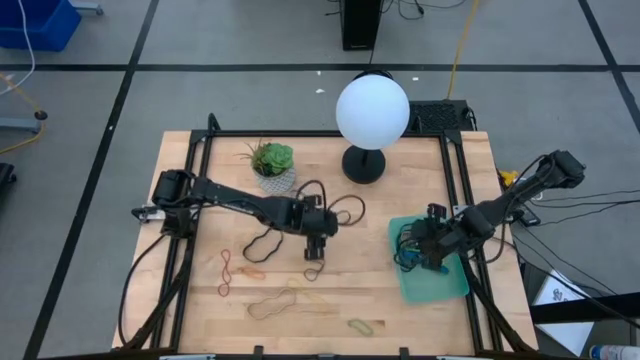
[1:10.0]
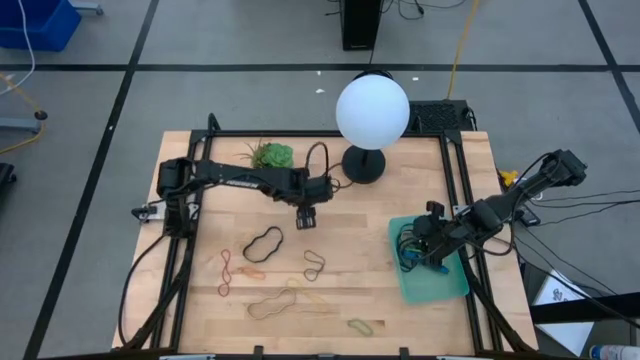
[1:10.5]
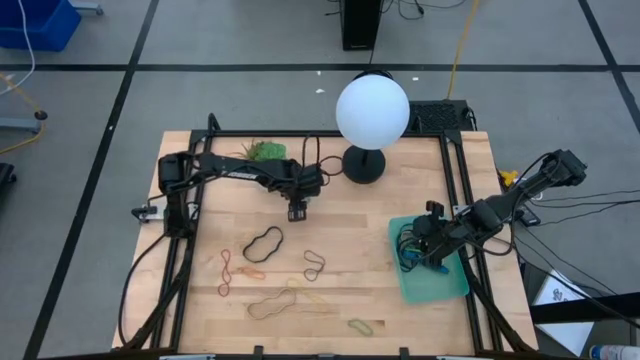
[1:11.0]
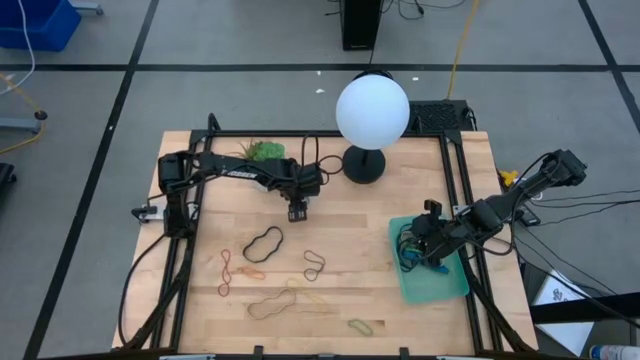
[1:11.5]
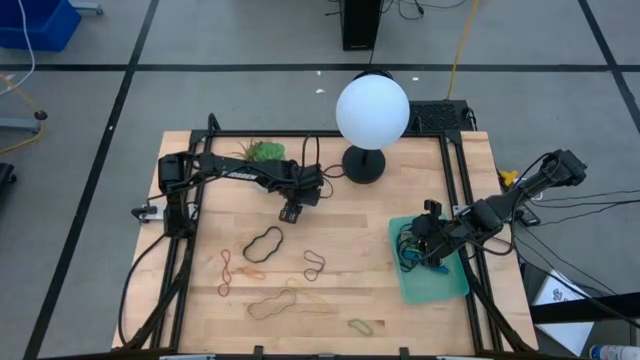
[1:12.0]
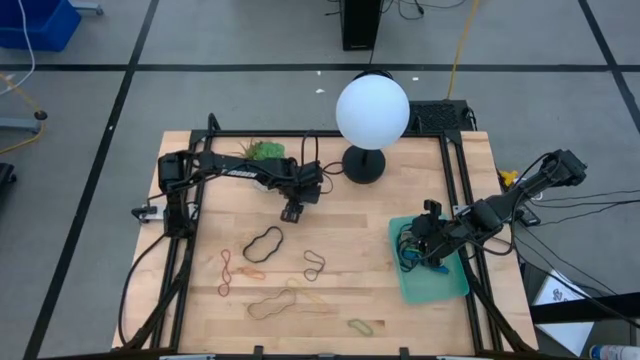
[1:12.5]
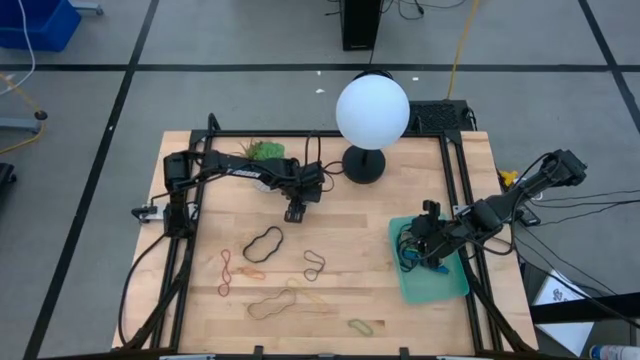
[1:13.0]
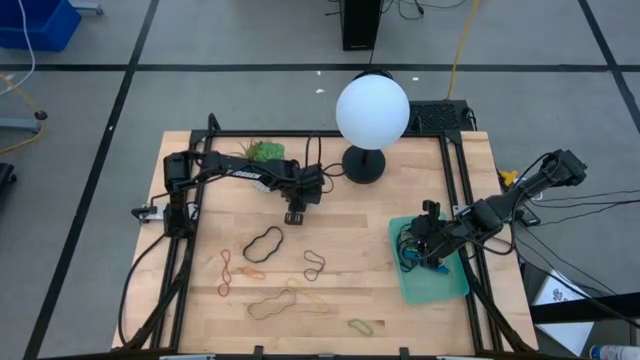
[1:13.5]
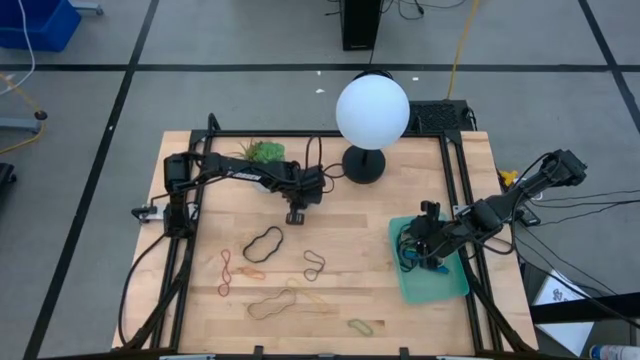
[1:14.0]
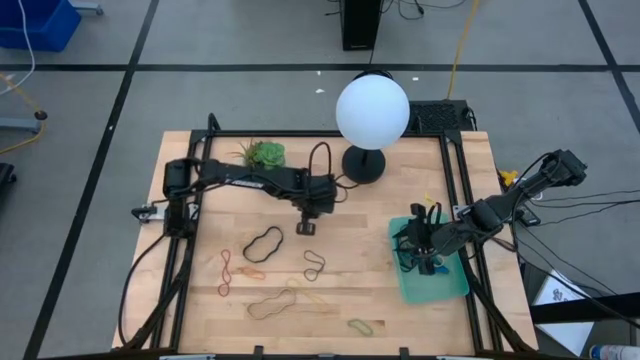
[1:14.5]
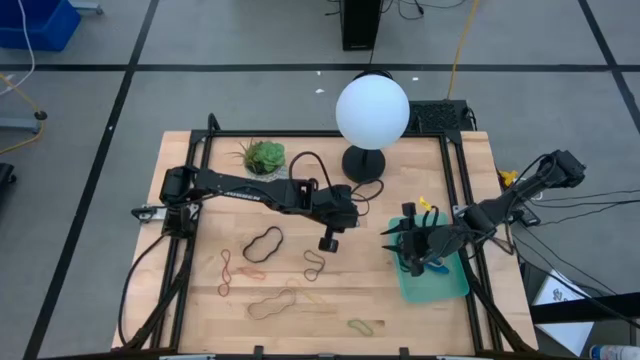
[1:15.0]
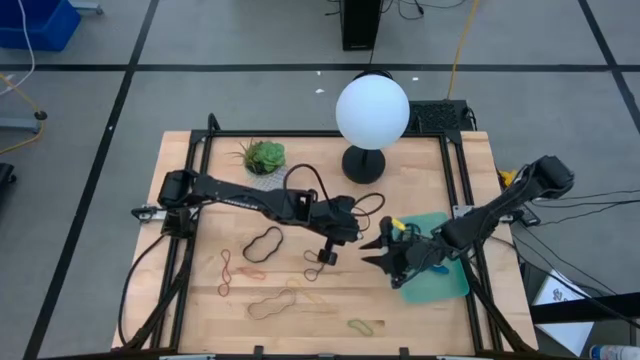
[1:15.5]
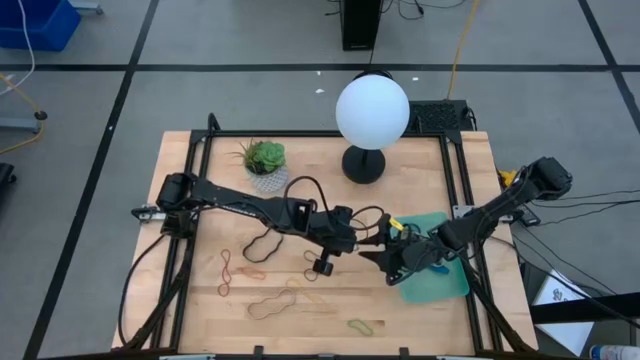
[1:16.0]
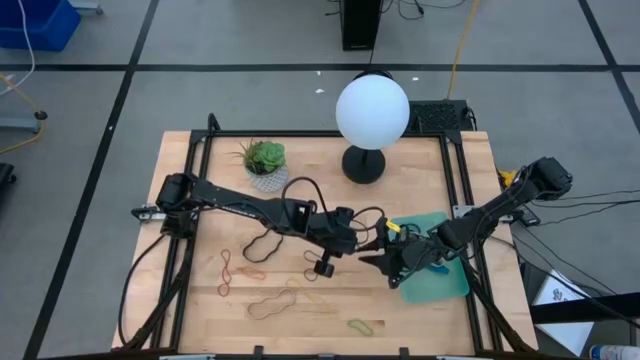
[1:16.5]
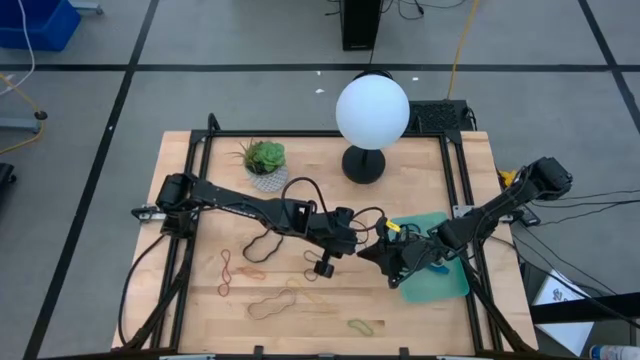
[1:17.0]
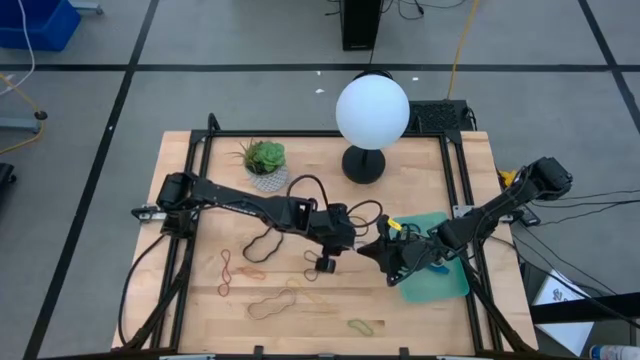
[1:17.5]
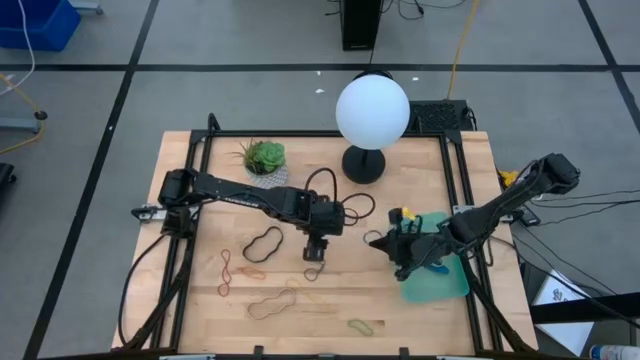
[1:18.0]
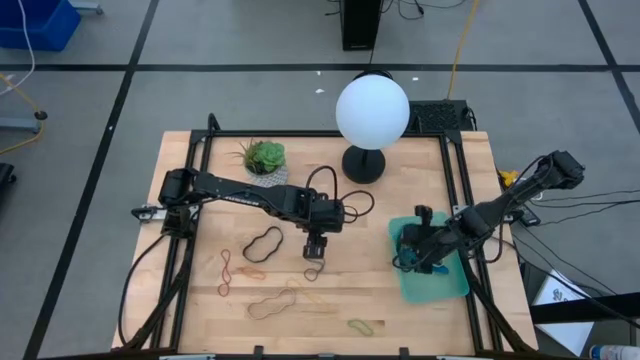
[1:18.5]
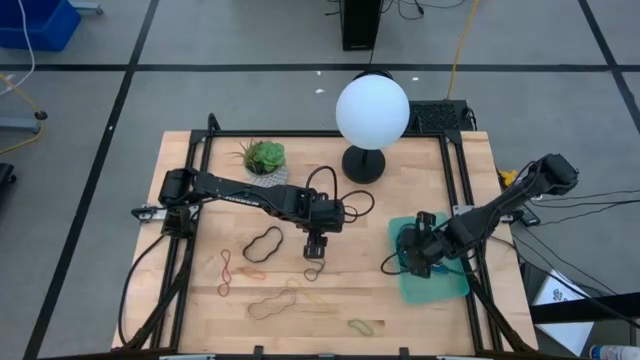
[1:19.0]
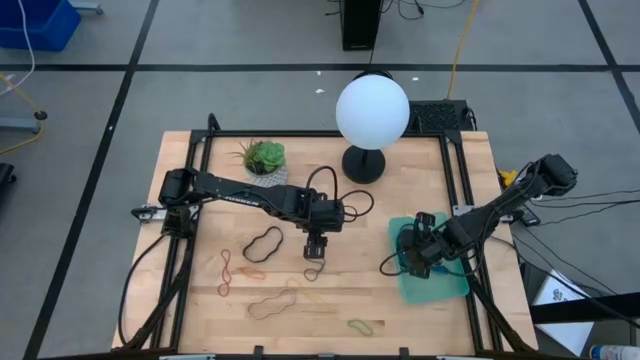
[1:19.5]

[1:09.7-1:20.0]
Task: Pick and place rubber bands into bin
Put the blue rubber band into the bin

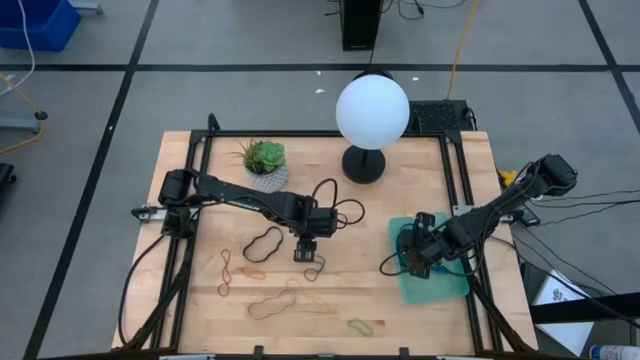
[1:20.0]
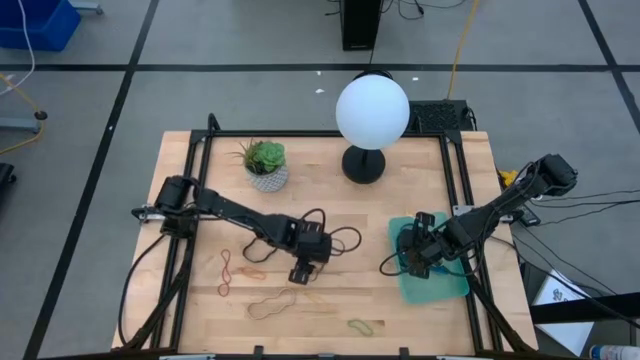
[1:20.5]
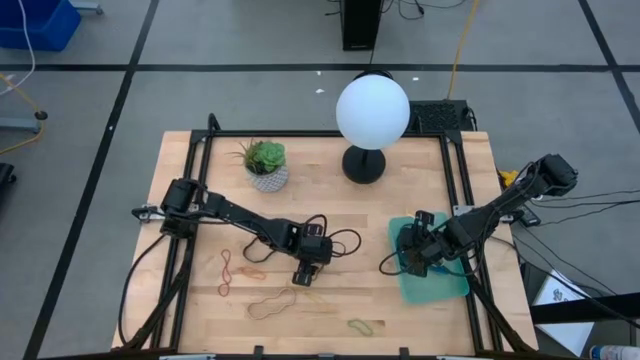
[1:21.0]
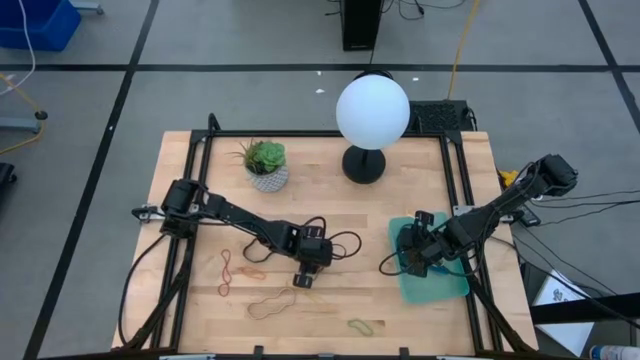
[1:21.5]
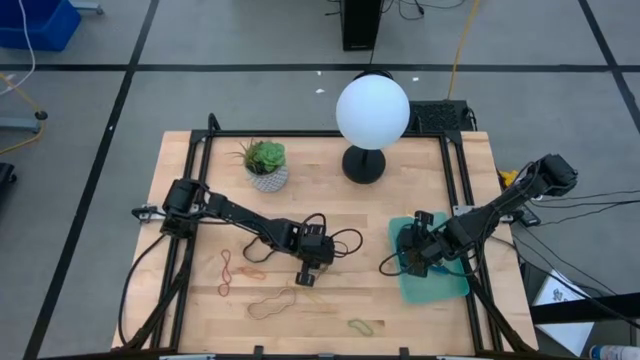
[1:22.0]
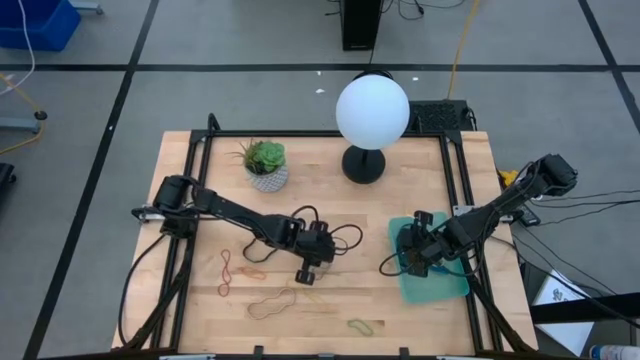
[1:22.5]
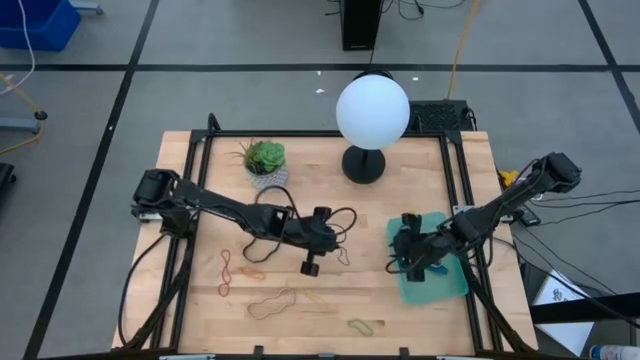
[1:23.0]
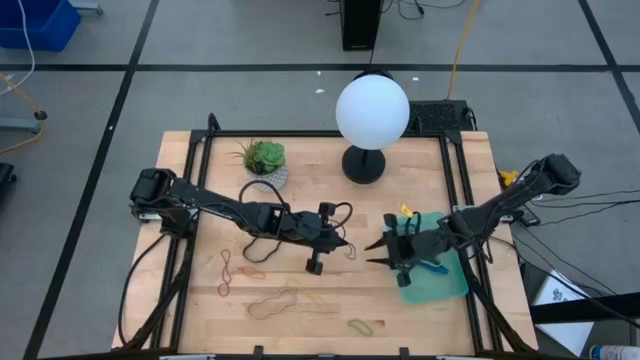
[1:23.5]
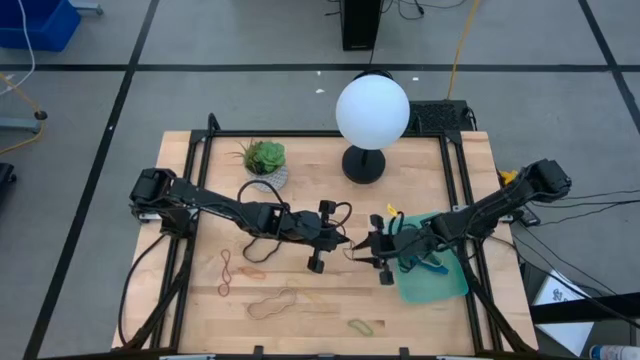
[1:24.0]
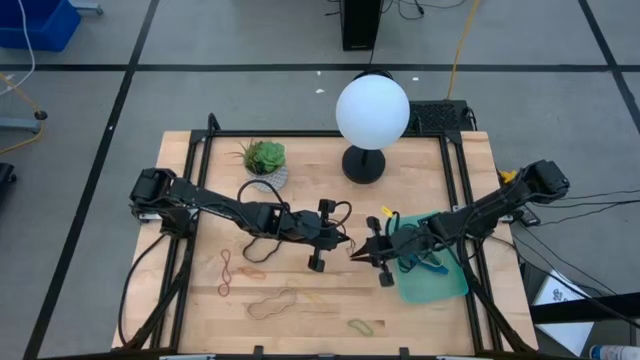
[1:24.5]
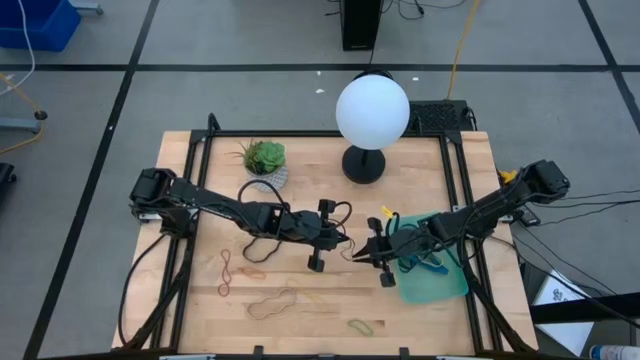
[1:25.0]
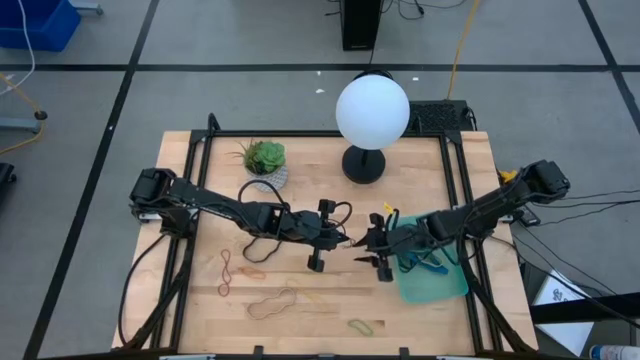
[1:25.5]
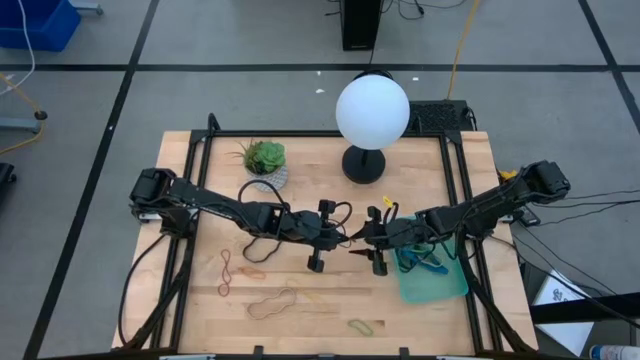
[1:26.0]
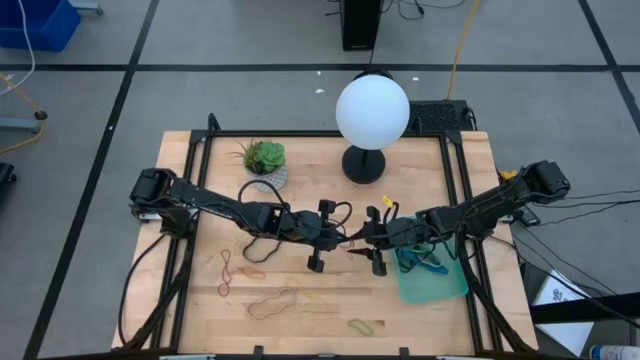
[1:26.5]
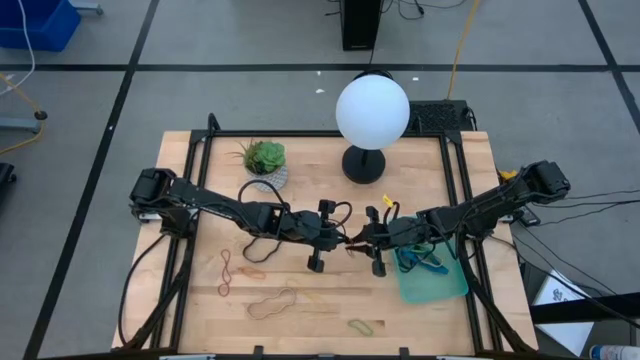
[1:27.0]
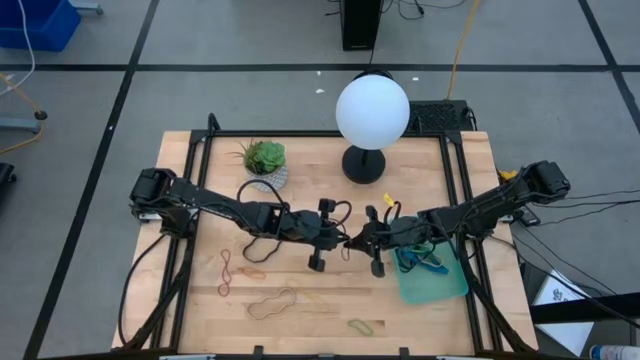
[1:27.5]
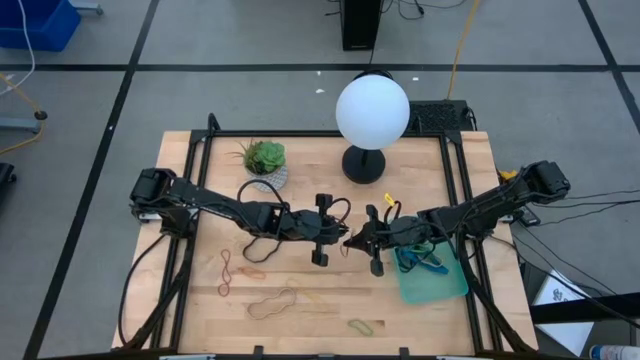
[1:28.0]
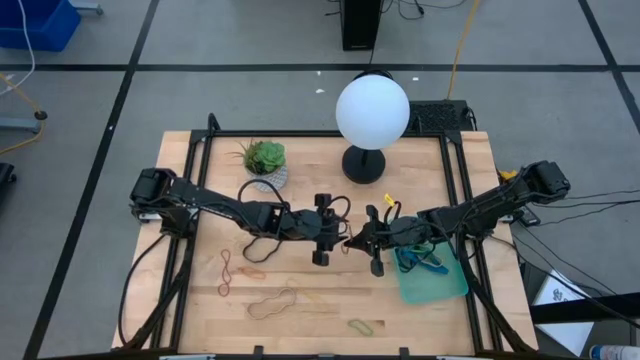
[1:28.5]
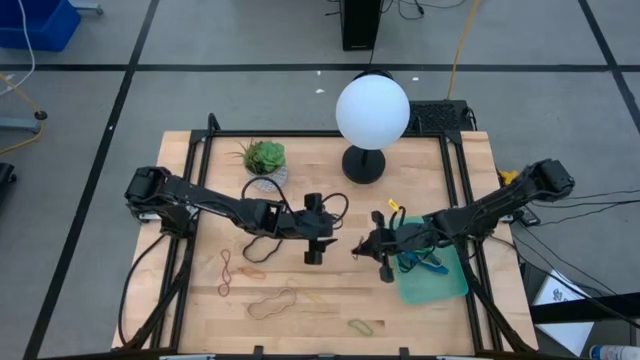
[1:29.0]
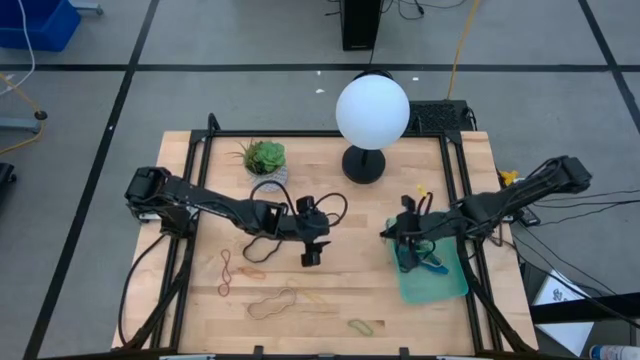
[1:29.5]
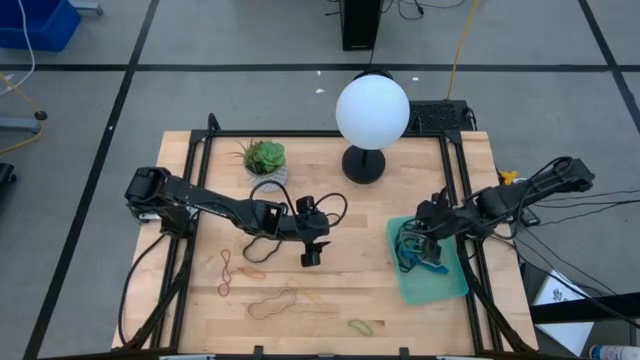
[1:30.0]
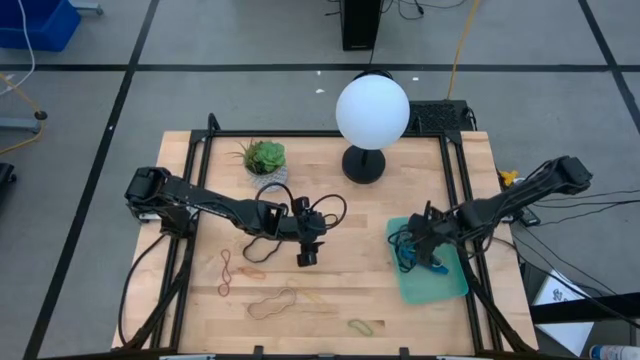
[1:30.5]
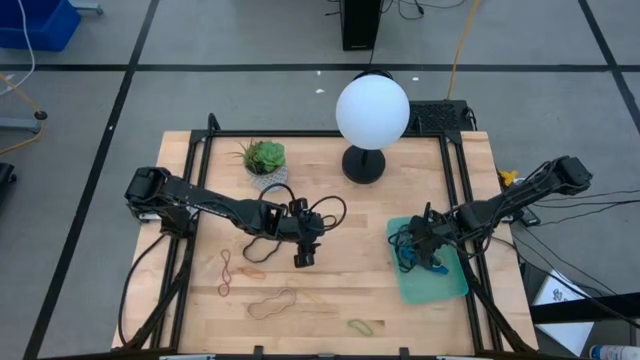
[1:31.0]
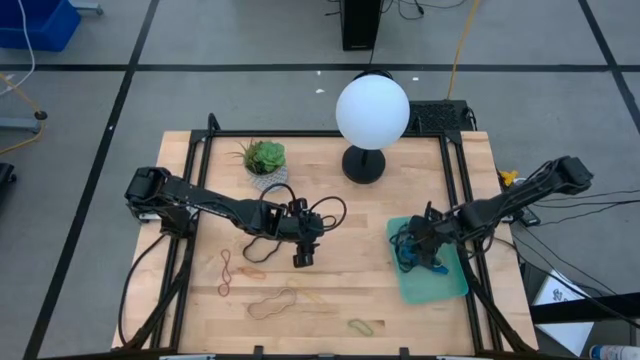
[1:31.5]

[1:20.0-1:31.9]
Put the purple rubber band into the bin
